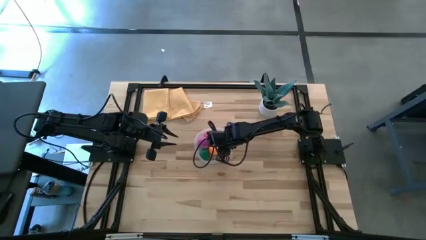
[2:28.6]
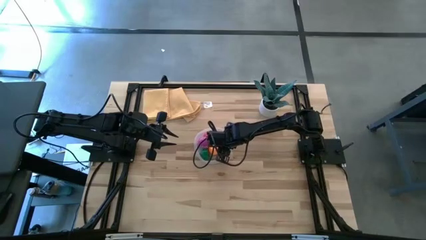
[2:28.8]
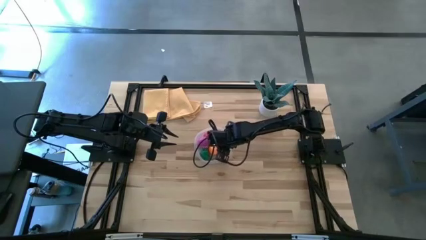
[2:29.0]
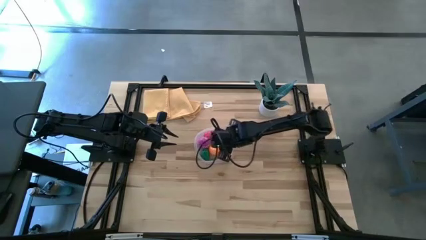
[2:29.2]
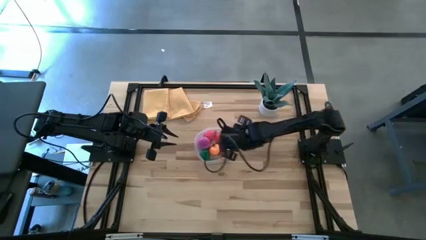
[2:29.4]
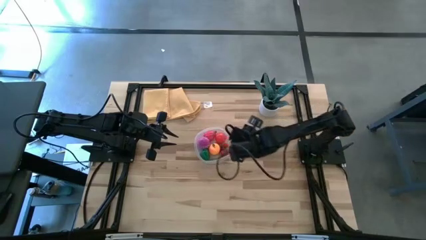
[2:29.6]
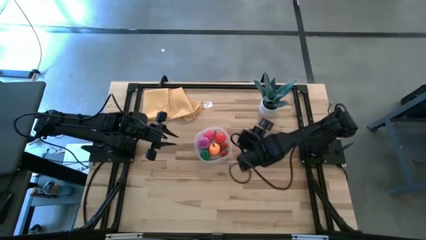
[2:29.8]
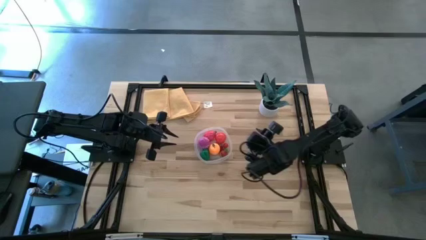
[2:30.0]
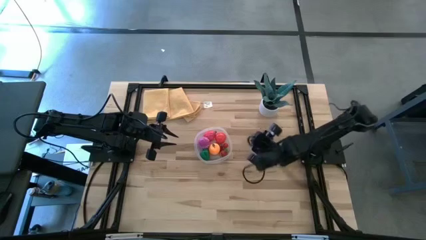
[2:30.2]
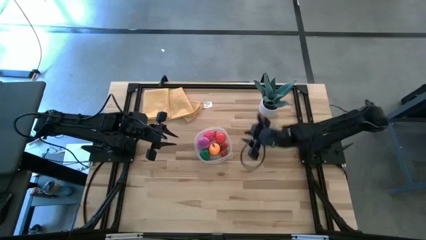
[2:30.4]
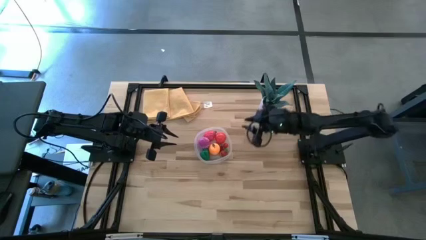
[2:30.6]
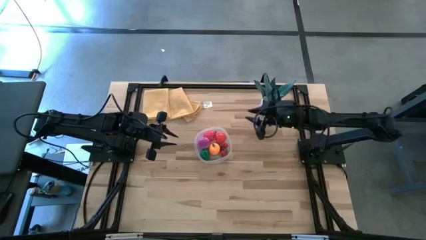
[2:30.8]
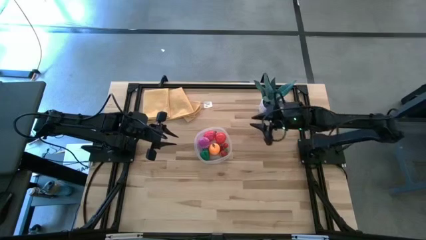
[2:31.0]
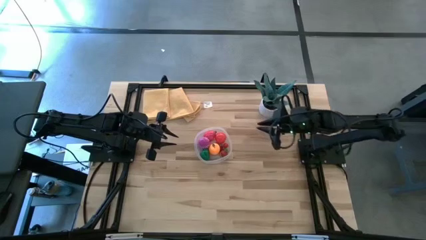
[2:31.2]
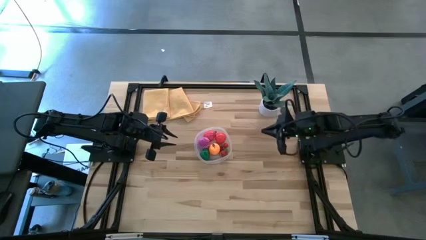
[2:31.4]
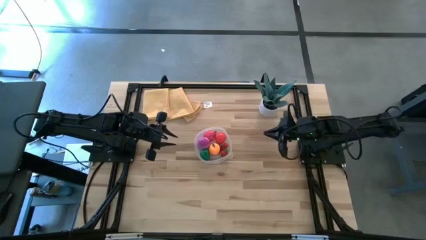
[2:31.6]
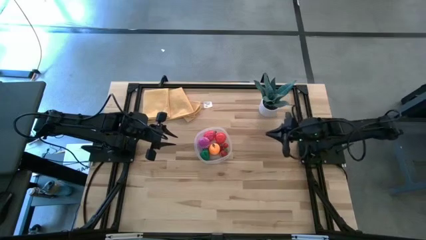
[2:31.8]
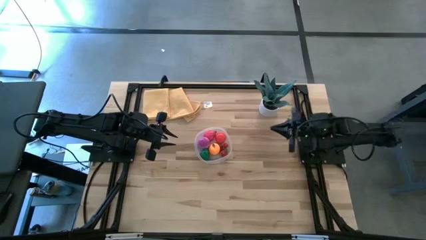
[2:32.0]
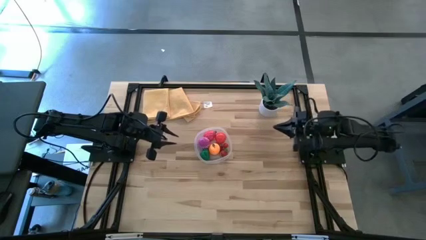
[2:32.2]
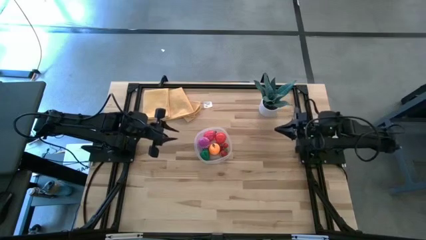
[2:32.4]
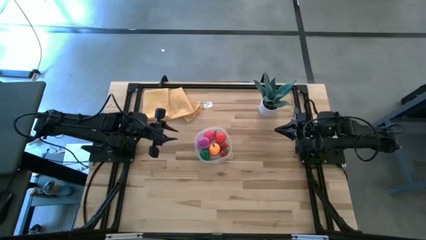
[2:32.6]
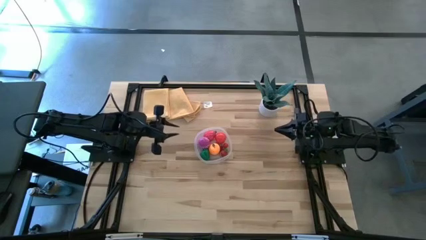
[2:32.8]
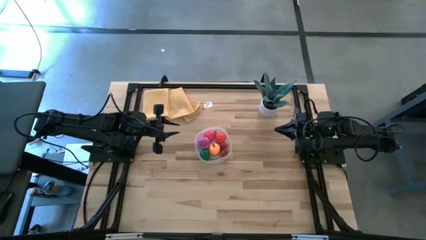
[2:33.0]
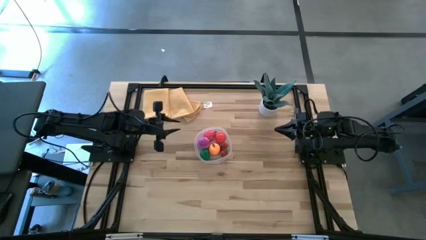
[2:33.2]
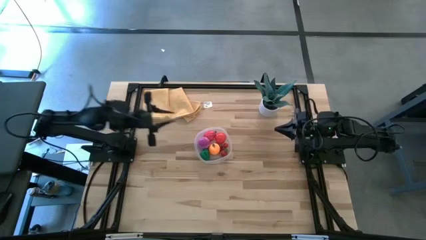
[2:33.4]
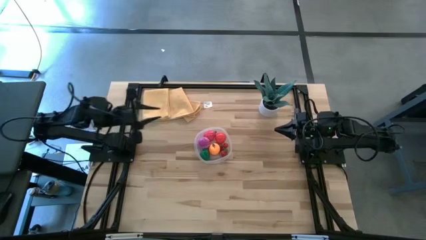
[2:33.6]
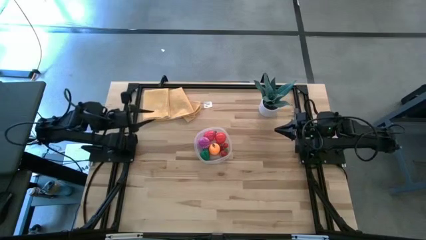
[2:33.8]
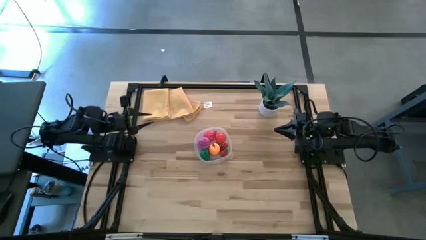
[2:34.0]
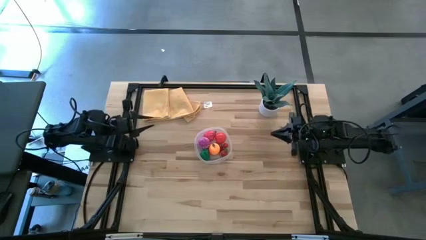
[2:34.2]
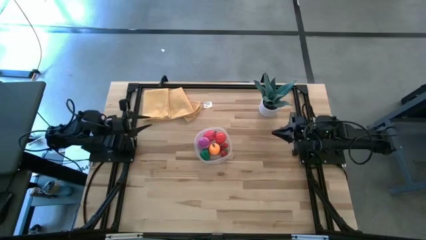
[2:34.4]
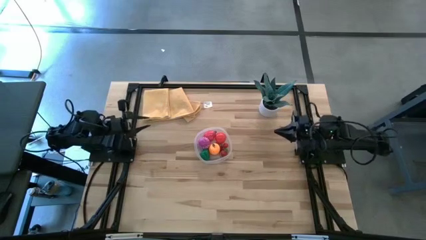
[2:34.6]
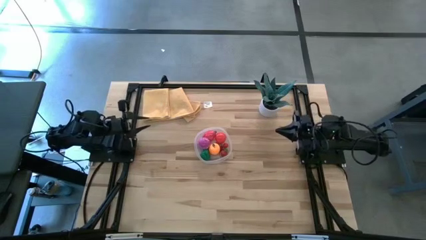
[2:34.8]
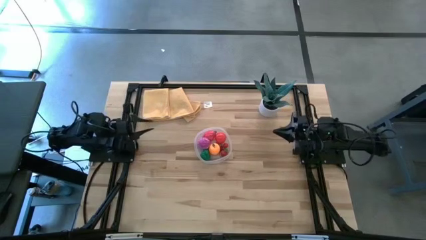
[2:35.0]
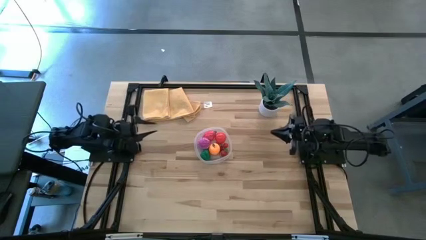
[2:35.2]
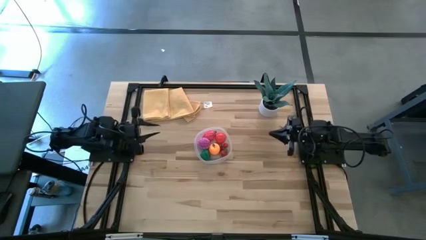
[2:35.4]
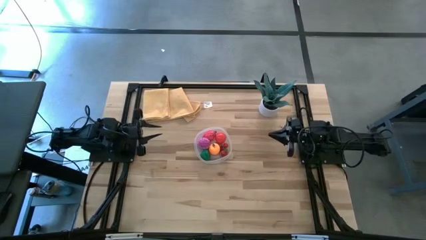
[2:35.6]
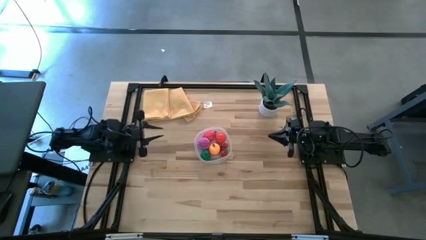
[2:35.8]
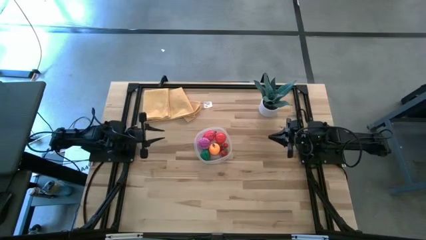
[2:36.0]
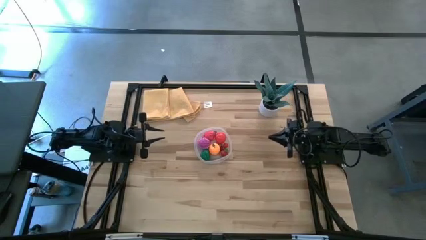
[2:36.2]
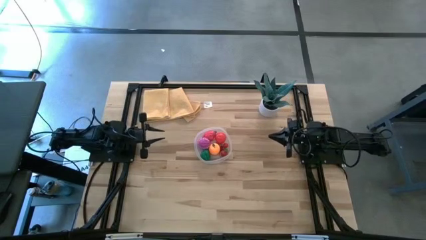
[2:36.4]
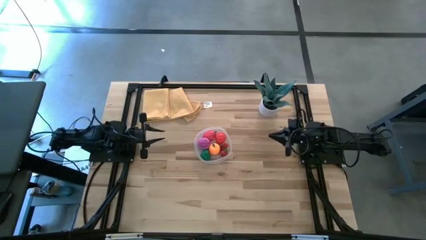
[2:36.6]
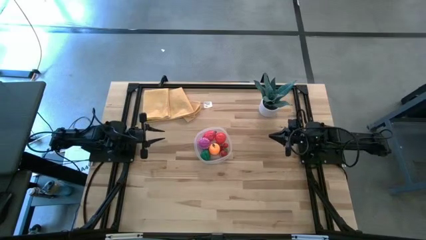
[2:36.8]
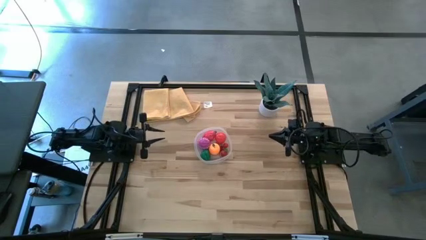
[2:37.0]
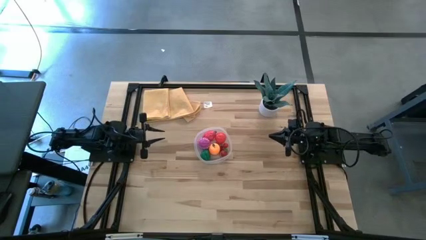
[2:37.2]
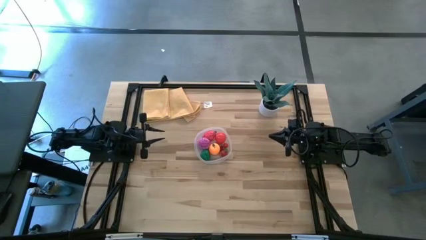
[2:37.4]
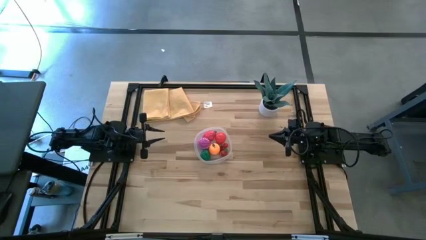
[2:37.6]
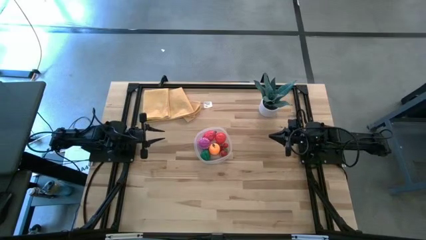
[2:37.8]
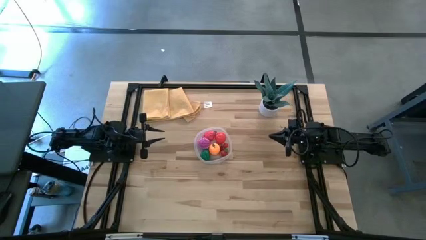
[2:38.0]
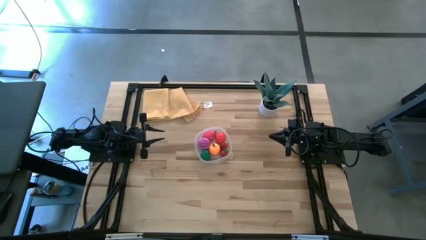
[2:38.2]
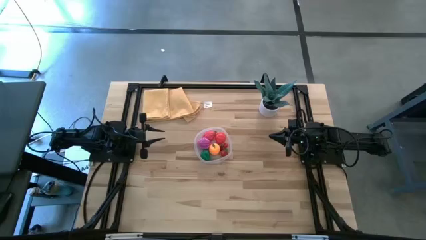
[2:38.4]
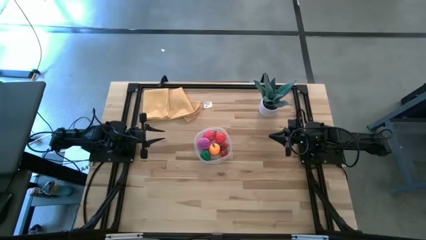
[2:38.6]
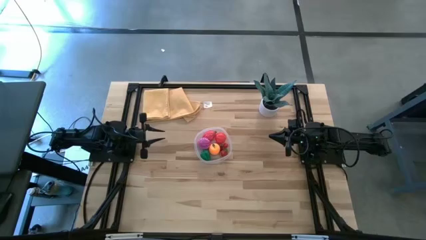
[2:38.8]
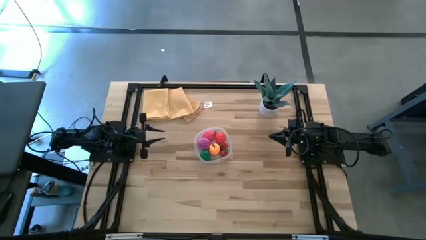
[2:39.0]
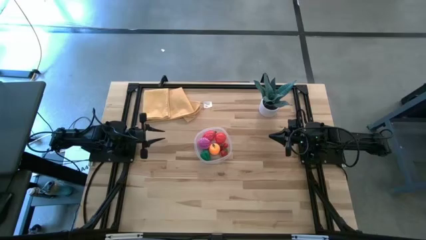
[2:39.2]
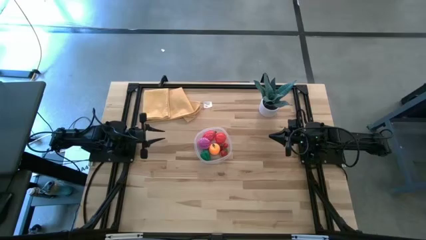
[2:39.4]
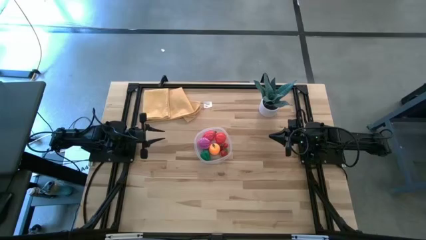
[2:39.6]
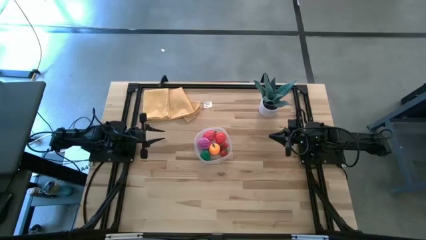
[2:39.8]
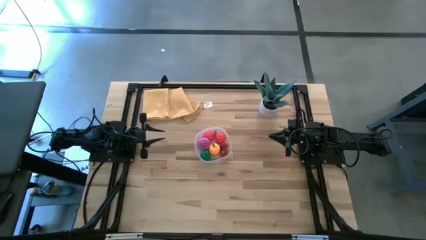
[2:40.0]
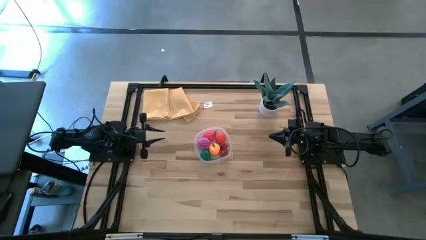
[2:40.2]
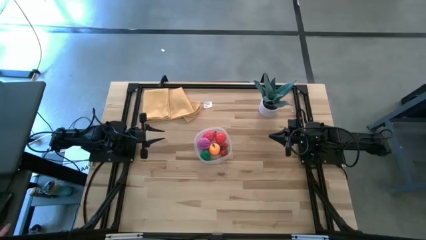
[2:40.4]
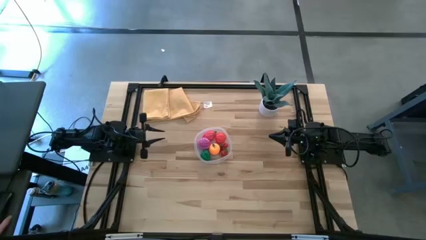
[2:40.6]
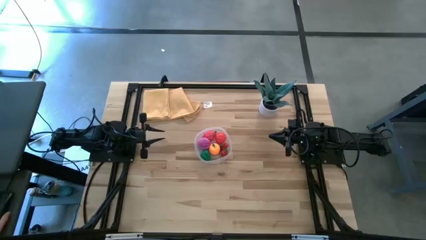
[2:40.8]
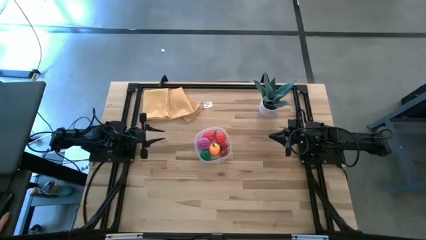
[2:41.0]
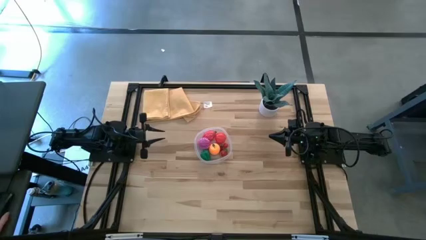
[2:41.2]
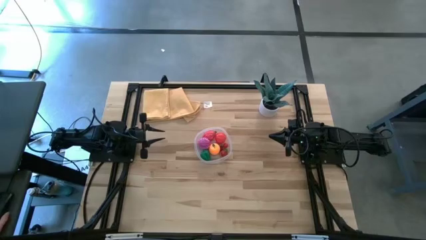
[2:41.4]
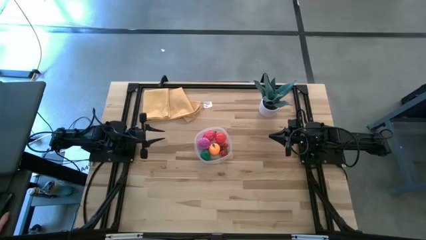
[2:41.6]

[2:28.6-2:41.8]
Task: Pick and placing Produce into tupperware
Return to Home Position
